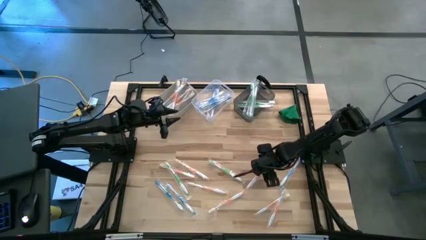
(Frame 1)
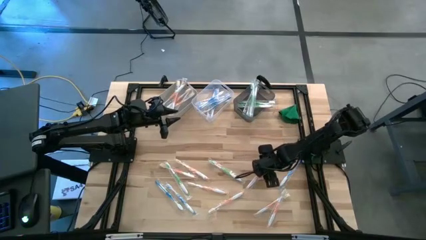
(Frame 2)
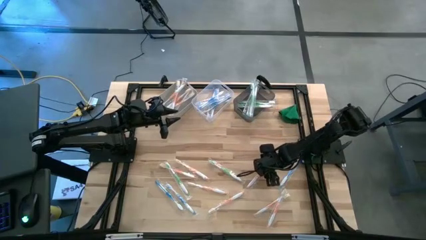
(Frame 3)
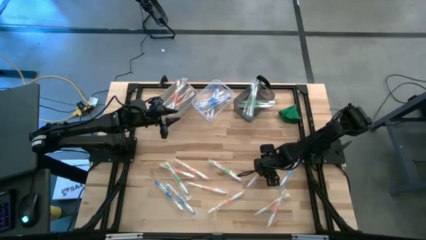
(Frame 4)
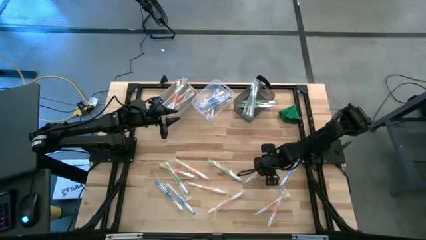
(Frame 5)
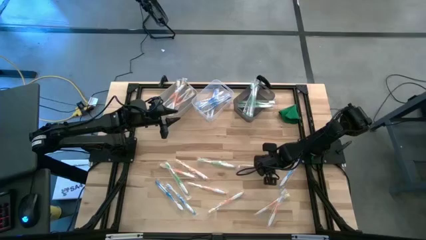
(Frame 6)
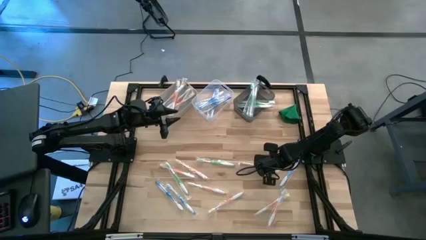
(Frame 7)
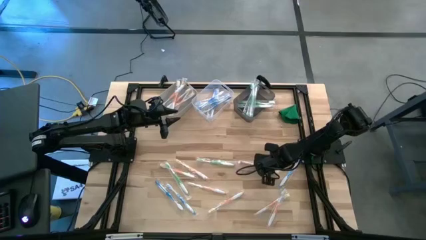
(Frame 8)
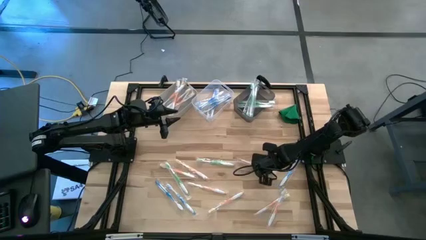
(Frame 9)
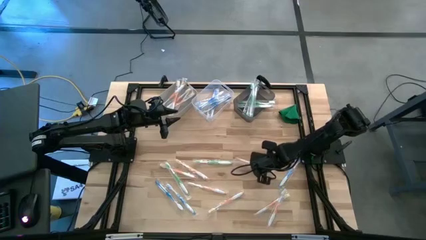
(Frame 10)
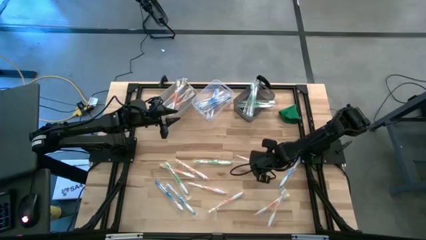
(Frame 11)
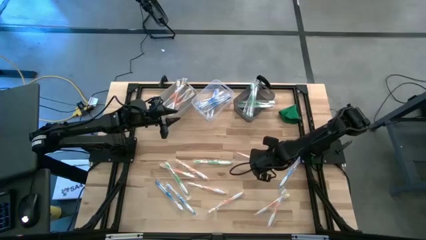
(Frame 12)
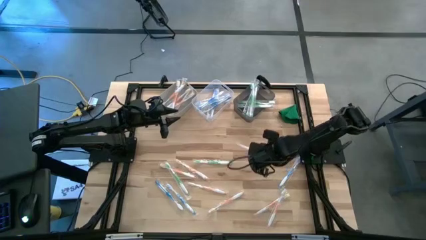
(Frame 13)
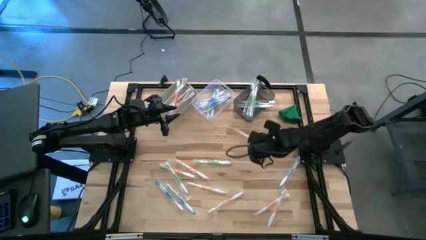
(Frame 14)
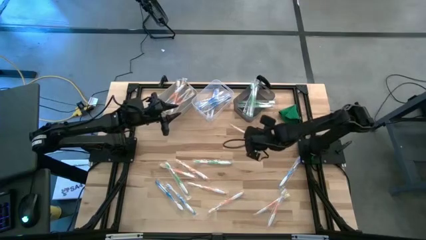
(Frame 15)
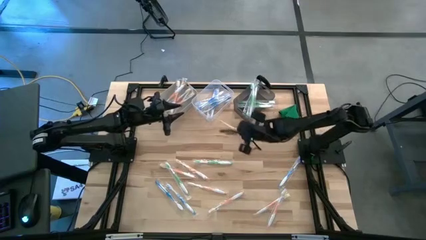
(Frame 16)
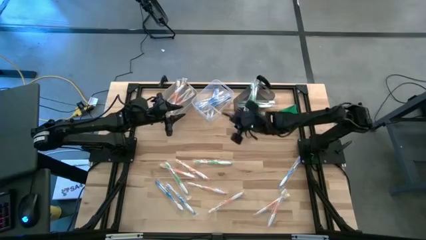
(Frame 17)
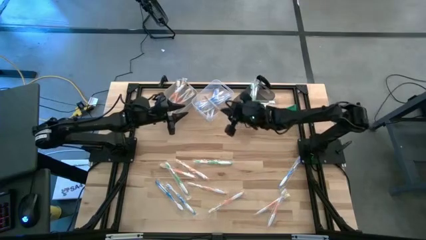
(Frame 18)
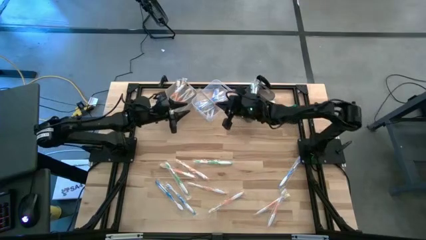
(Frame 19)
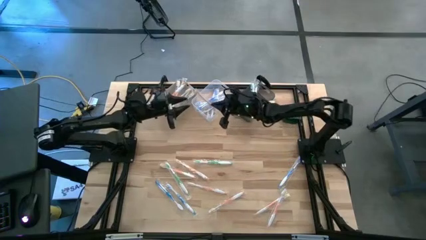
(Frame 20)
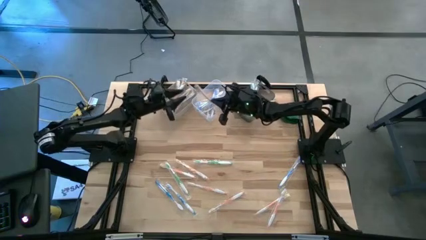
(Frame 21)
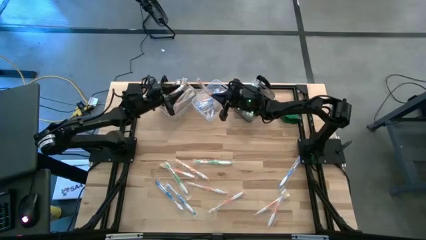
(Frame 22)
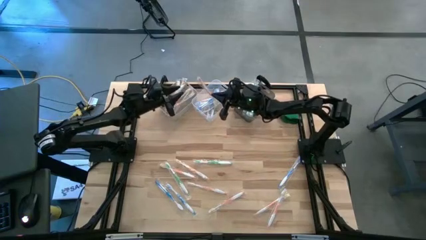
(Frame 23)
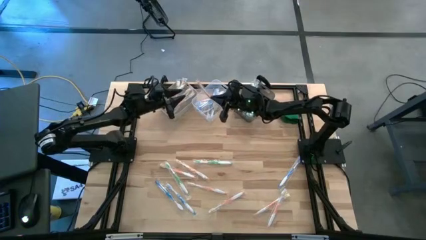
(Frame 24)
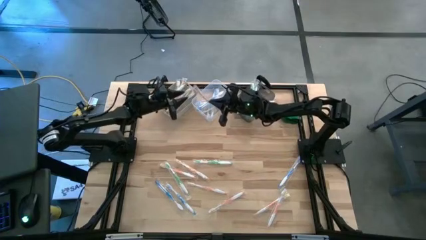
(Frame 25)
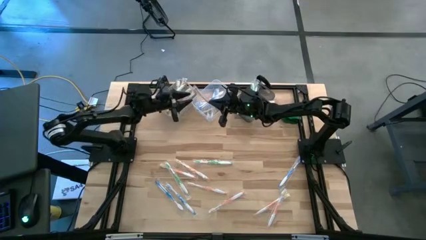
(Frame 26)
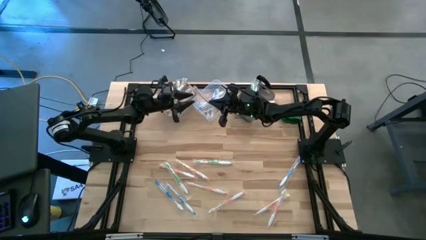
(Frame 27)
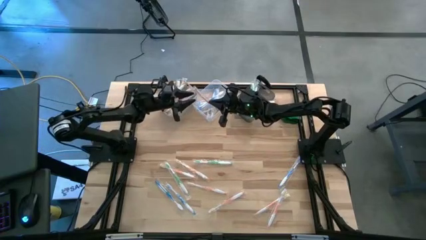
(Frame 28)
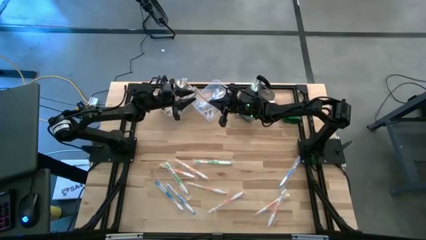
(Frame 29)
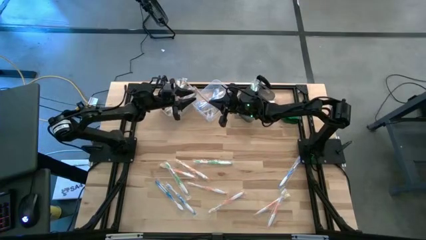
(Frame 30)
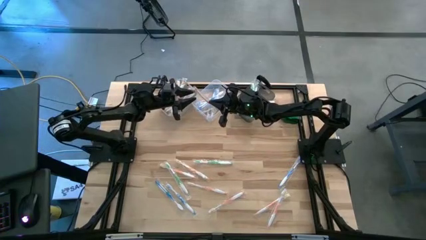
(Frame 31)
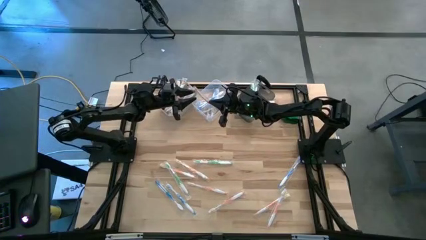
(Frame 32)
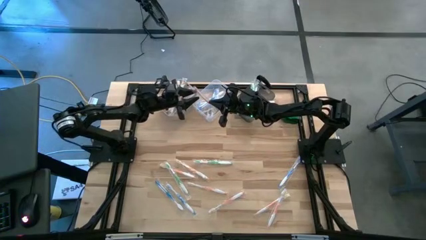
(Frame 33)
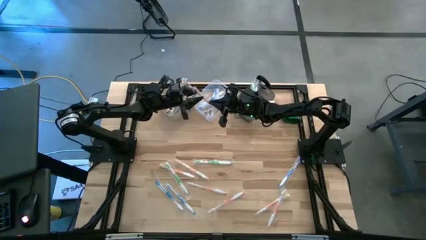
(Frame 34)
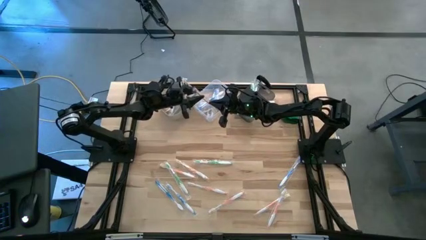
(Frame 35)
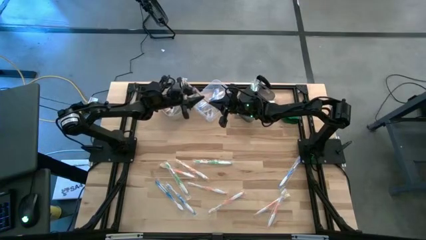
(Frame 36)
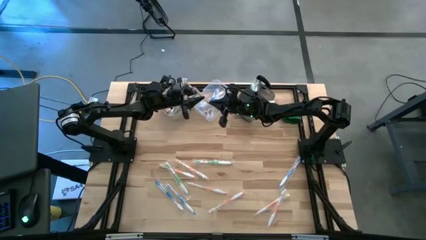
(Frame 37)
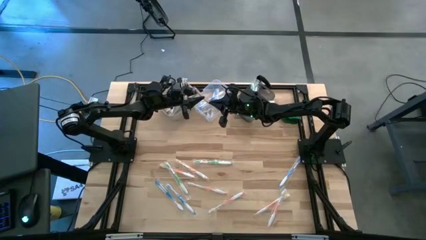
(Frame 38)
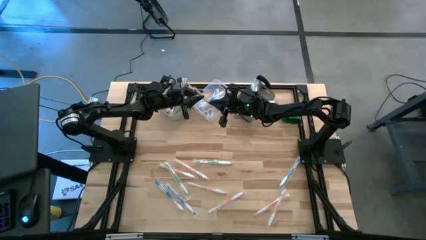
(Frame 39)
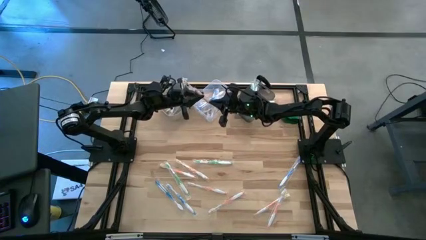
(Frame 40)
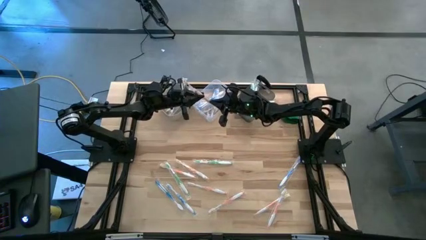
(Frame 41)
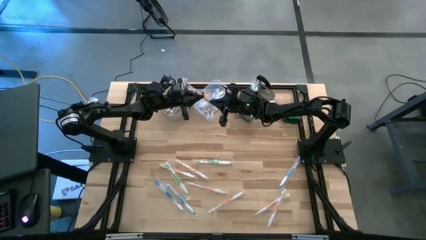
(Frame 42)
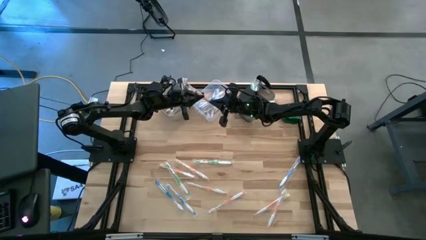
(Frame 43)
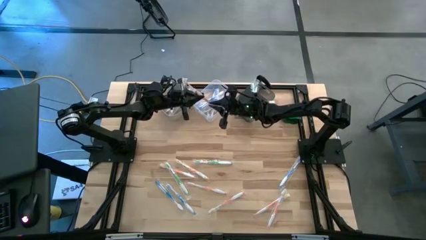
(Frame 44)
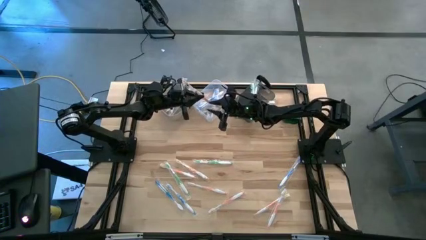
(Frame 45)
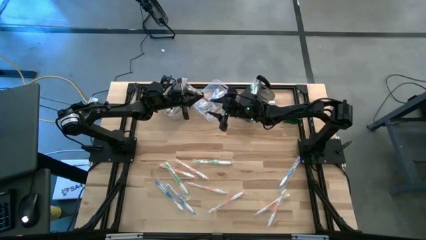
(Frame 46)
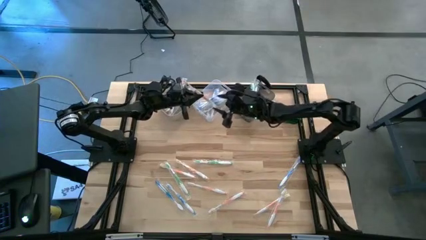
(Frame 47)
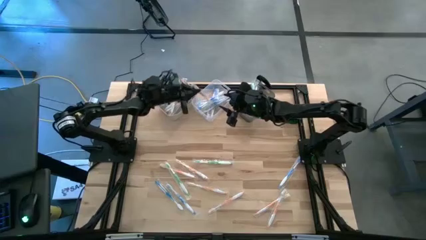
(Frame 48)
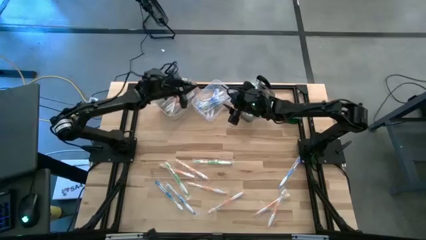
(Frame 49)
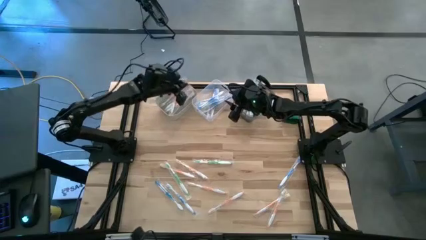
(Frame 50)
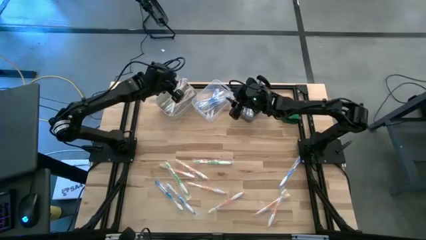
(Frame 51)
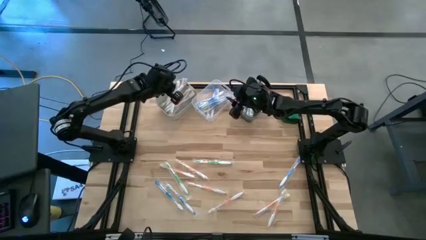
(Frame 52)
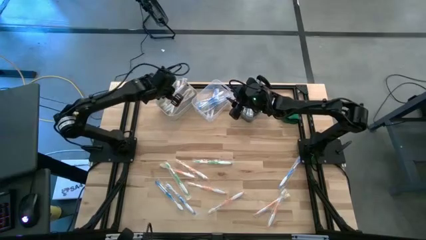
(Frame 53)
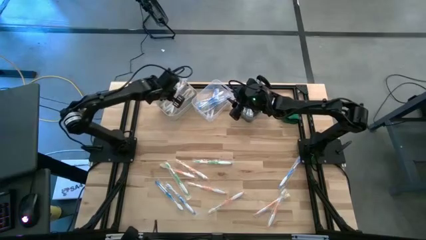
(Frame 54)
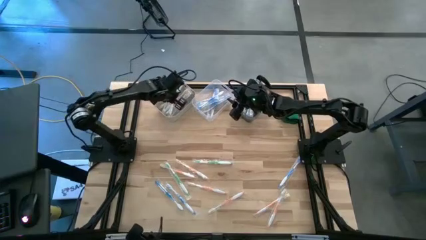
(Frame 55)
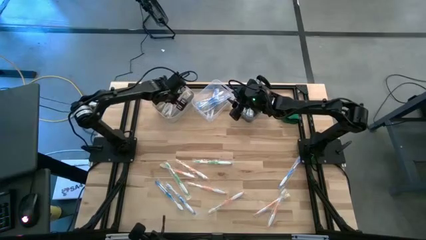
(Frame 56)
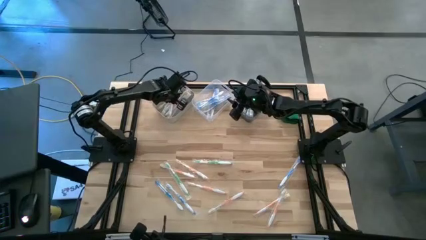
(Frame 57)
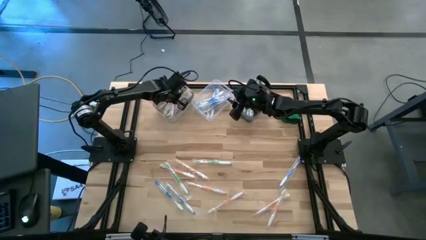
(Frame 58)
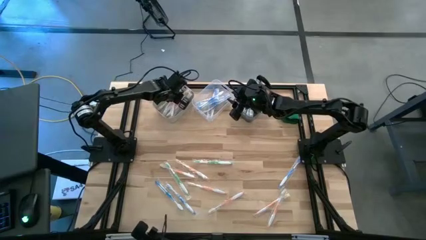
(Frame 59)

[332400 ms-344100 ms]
Task: Pick & Place Toothbrushes
Put the orange toothbrush into the white bin

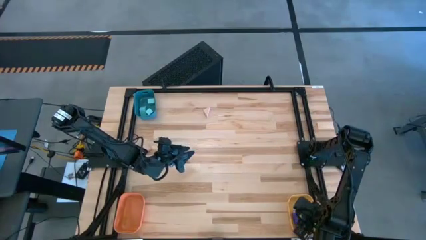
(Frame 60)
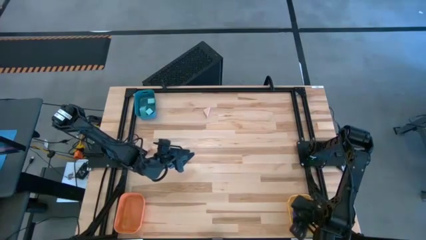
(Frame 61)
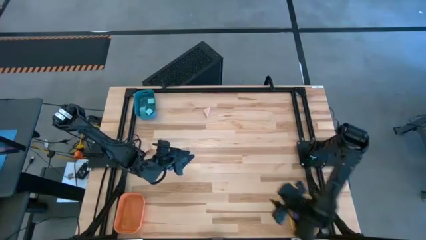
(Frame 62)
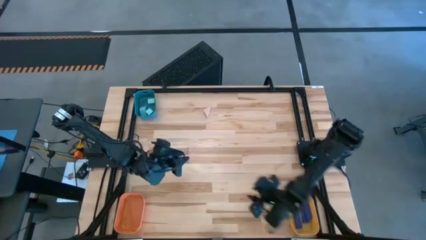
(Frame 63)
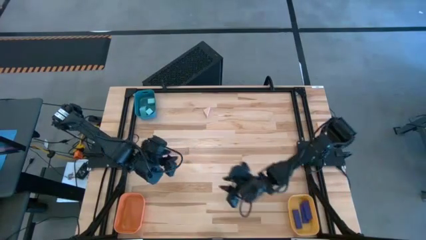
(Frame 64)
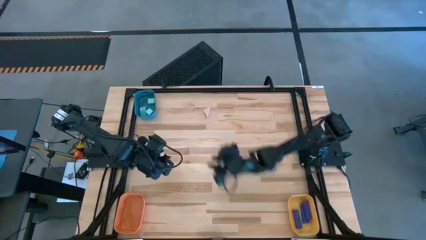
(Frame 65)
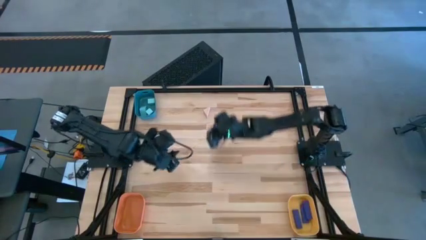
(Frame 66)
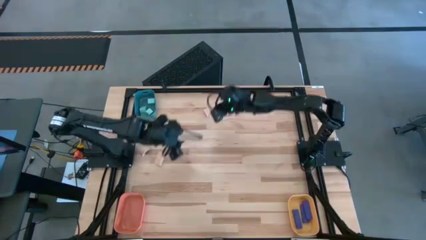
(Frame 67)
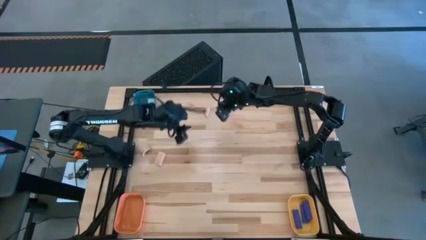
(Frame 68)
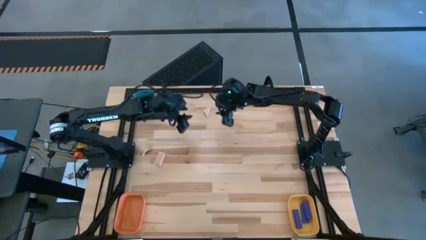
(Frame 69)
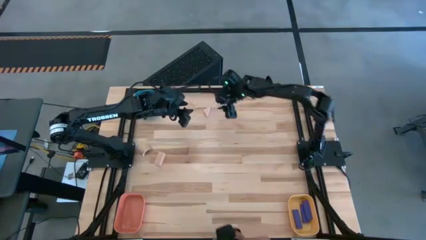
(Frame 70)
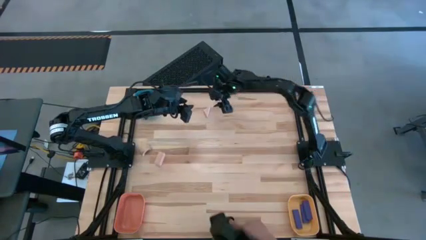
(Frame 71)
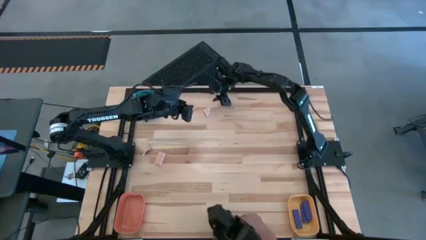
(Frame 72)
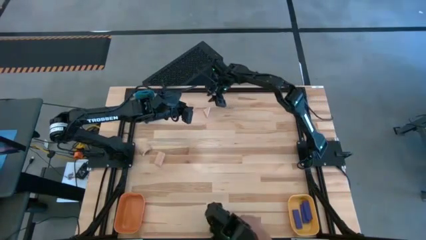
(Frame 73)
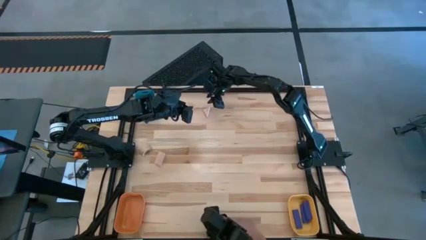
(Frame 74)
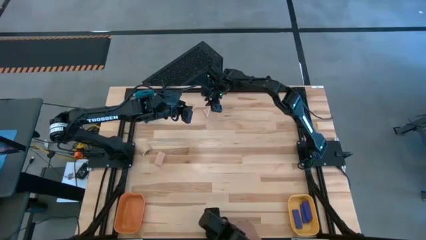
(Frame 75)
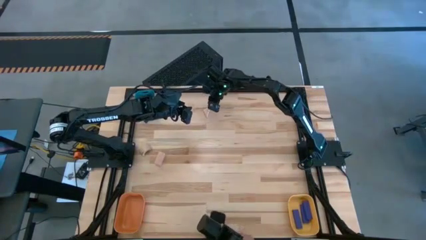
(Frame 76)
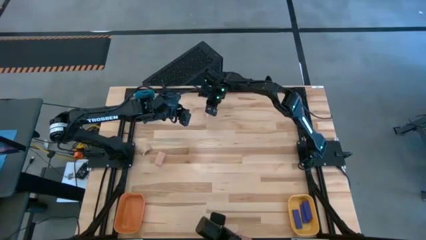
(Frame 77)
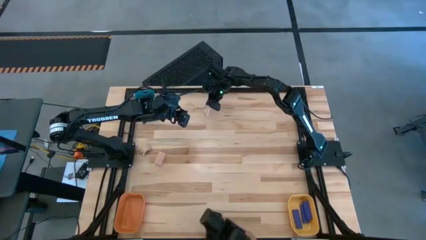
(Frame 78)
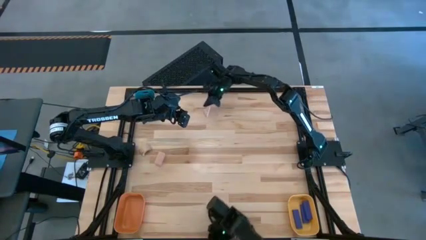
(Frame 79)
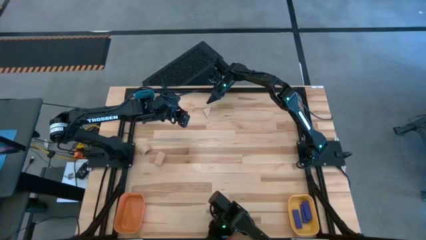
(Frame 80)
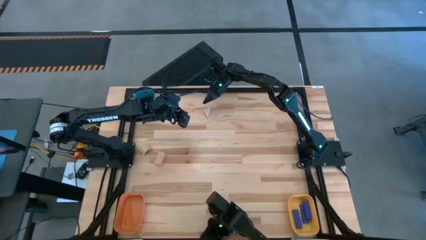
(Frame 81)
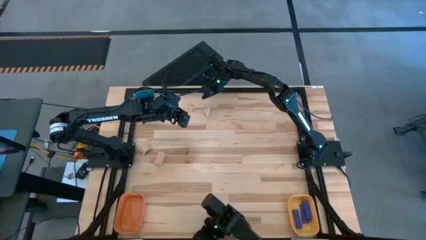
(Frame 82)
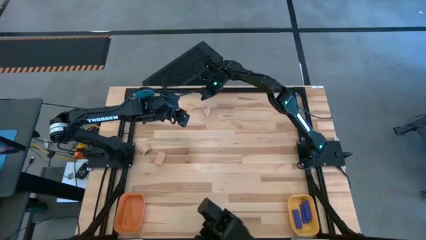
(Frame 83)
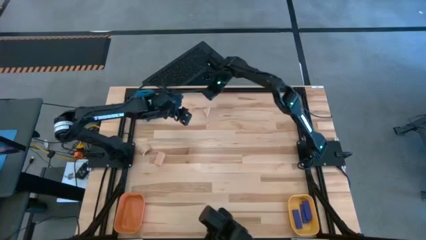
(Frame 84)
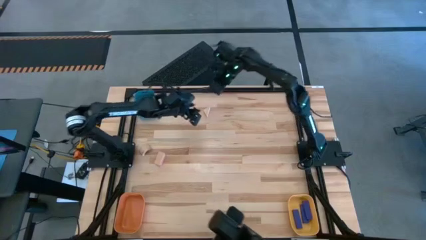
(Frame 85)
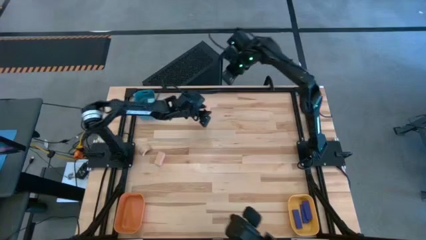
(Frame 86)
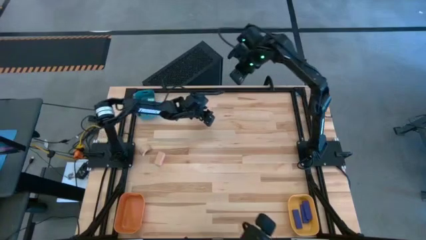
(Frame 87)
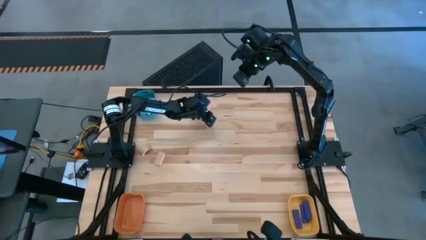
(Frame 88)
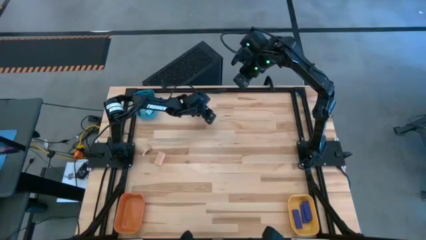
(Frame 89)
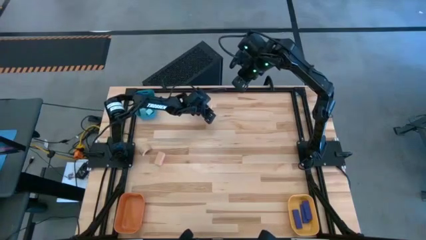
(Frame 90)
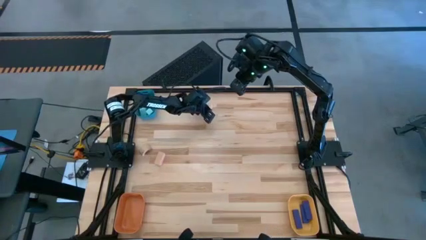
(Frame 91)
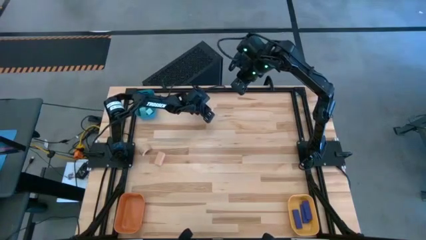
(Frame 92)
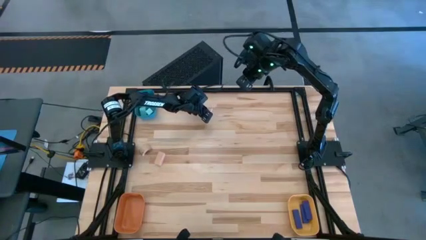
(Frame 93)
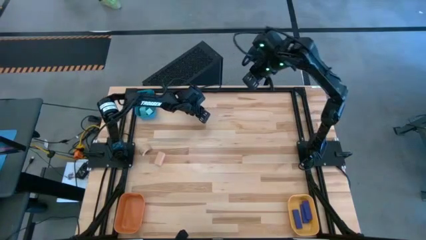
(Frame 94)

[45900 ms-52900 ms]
Task: Sort & place blocks by color
Put the top brown block into the orange bin
